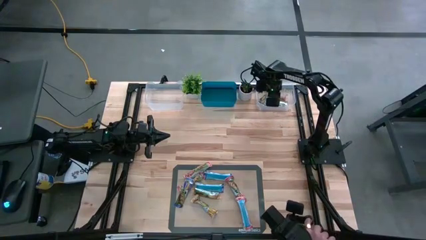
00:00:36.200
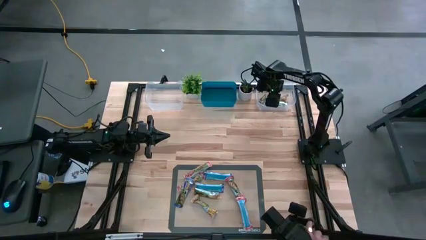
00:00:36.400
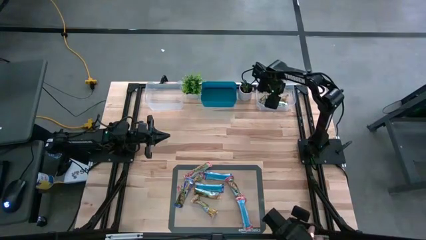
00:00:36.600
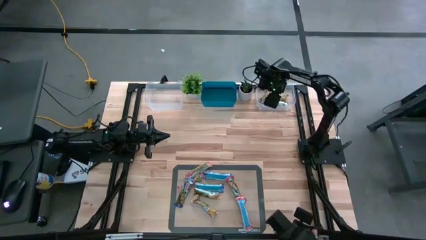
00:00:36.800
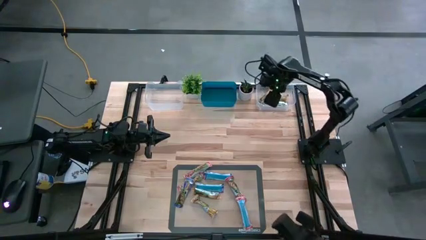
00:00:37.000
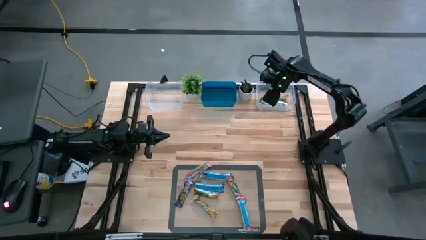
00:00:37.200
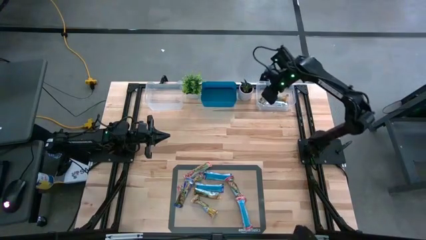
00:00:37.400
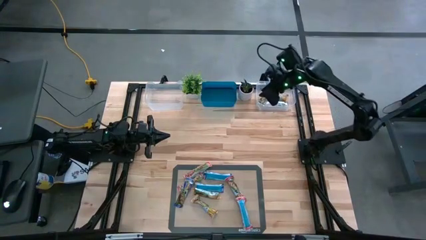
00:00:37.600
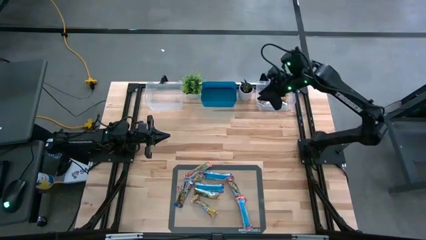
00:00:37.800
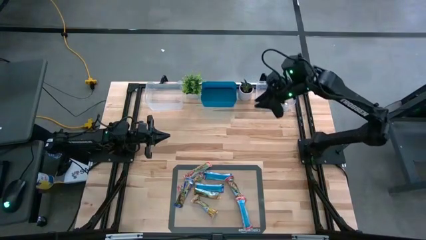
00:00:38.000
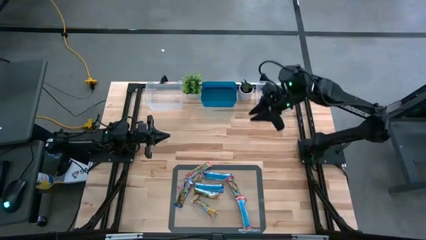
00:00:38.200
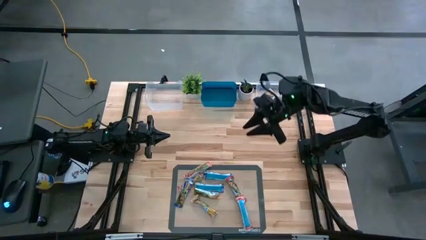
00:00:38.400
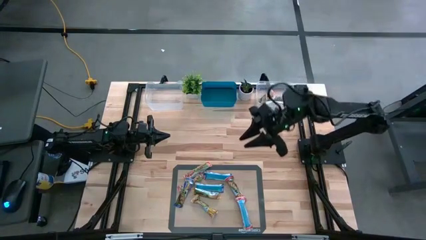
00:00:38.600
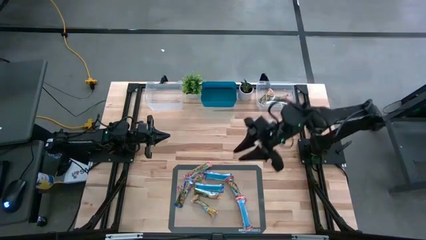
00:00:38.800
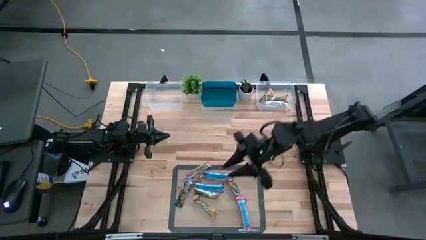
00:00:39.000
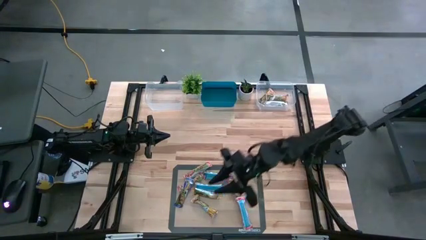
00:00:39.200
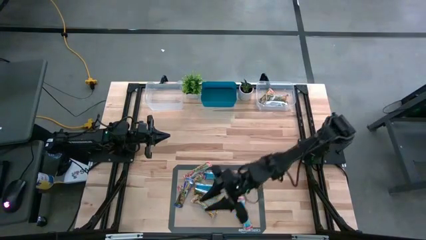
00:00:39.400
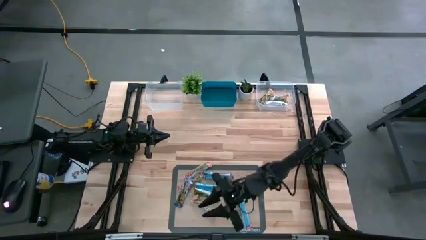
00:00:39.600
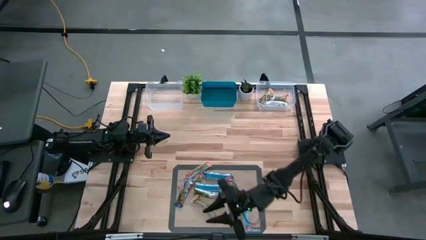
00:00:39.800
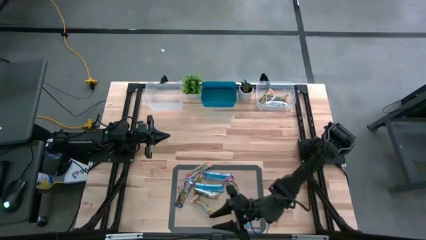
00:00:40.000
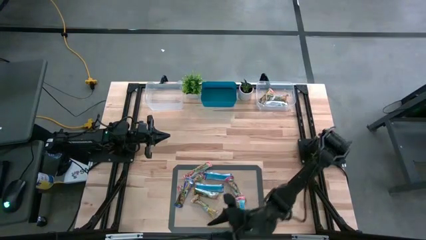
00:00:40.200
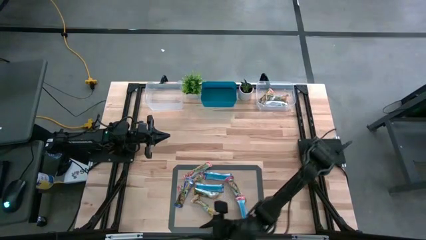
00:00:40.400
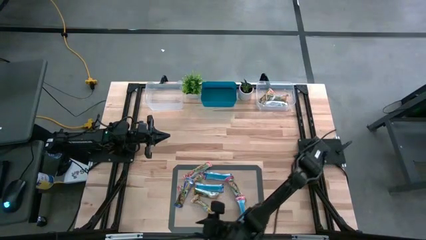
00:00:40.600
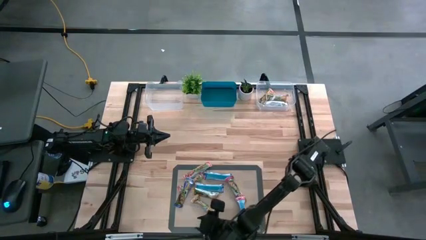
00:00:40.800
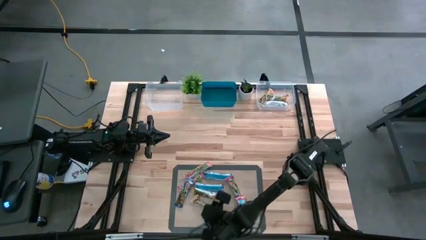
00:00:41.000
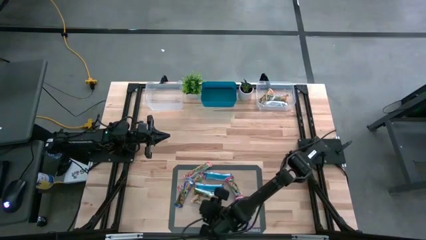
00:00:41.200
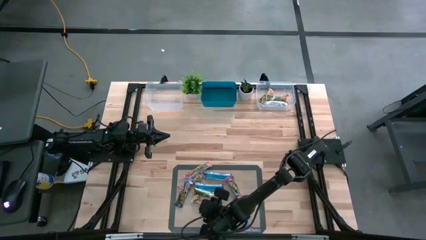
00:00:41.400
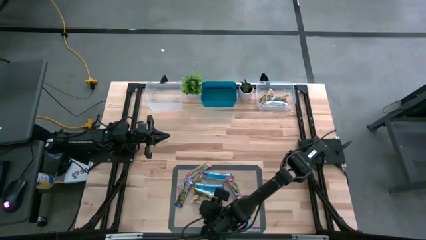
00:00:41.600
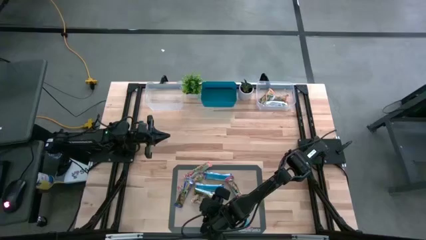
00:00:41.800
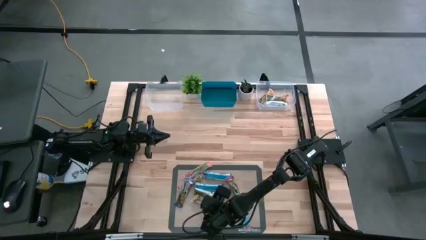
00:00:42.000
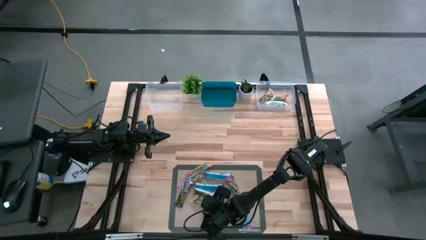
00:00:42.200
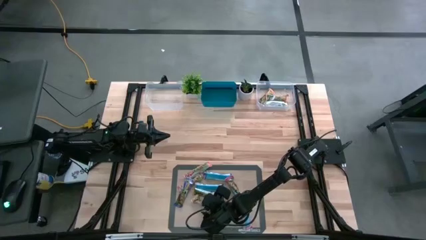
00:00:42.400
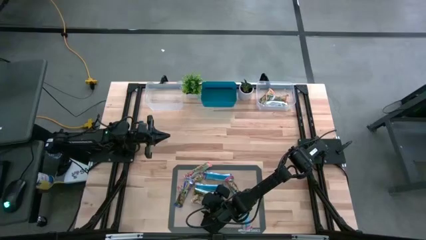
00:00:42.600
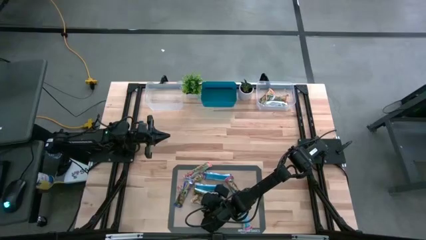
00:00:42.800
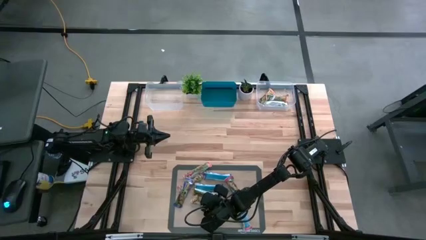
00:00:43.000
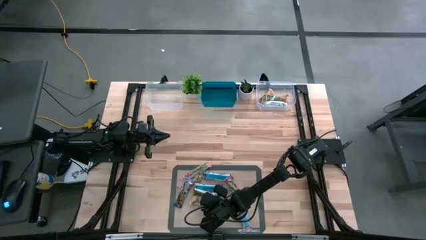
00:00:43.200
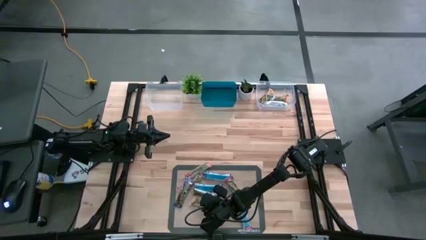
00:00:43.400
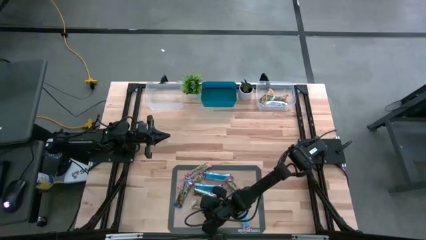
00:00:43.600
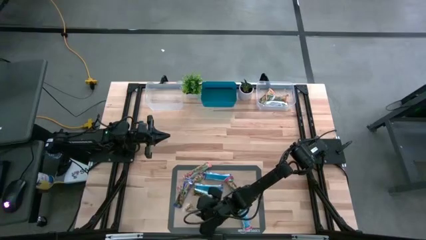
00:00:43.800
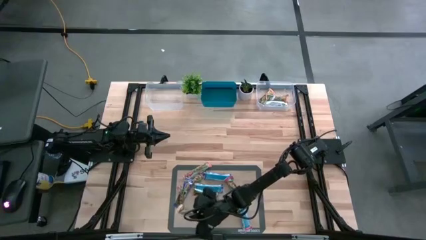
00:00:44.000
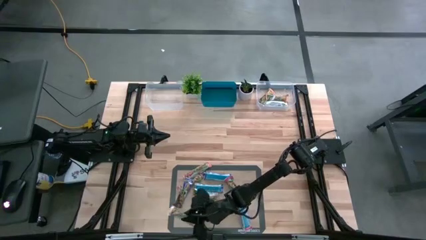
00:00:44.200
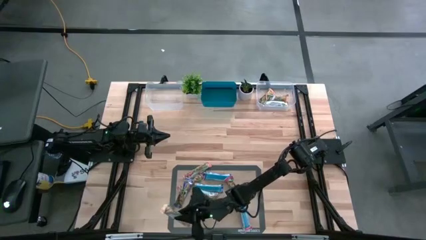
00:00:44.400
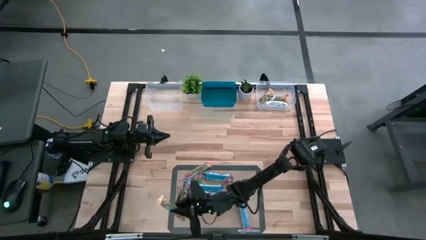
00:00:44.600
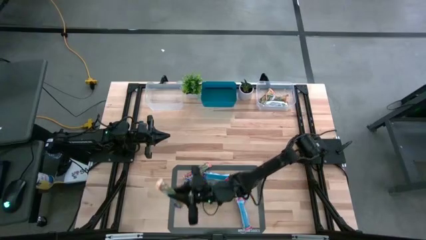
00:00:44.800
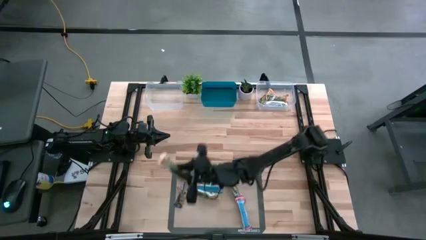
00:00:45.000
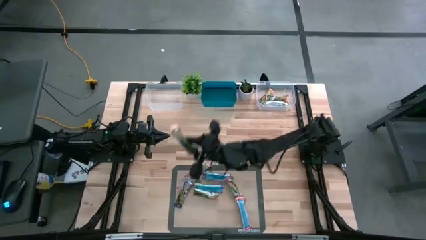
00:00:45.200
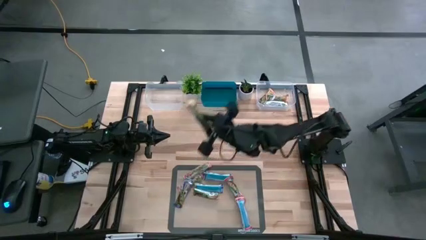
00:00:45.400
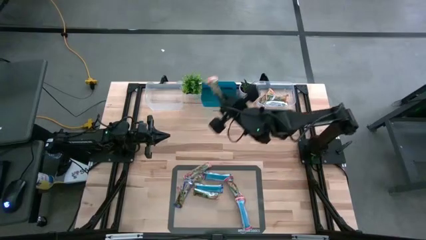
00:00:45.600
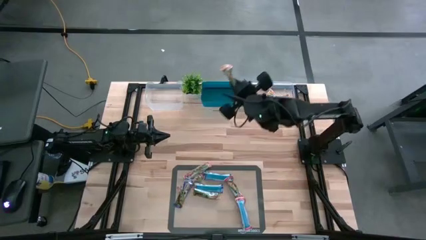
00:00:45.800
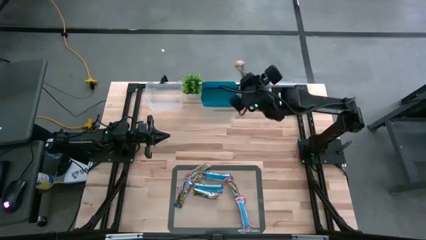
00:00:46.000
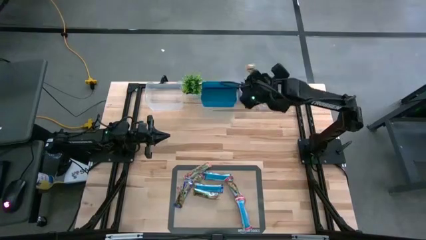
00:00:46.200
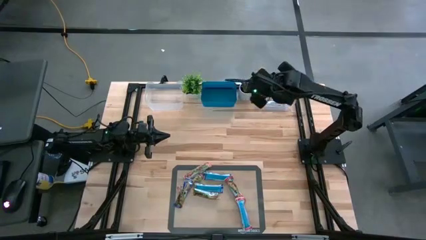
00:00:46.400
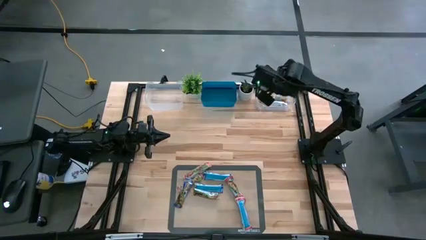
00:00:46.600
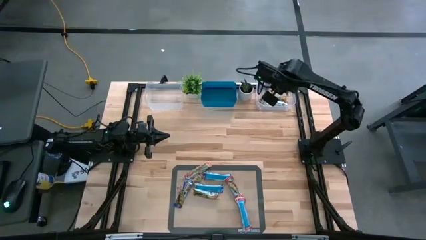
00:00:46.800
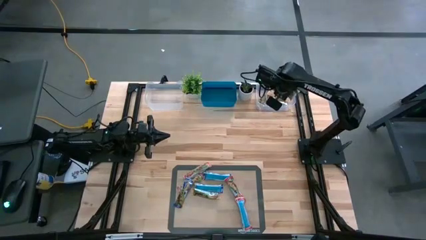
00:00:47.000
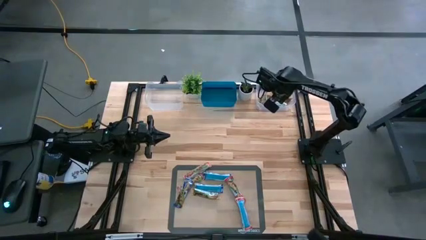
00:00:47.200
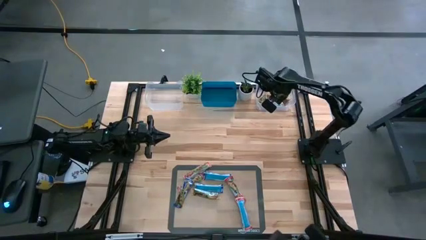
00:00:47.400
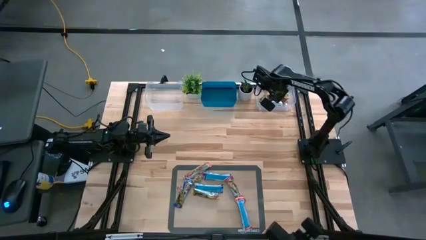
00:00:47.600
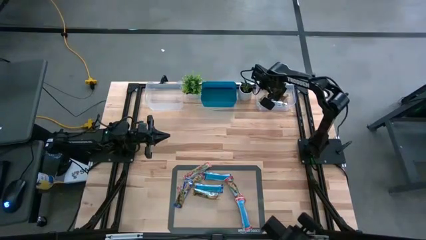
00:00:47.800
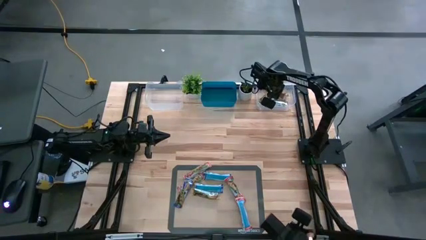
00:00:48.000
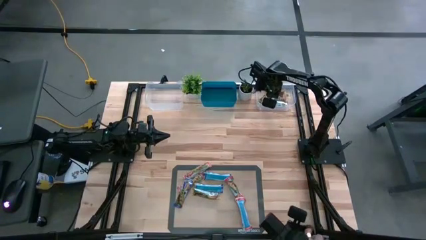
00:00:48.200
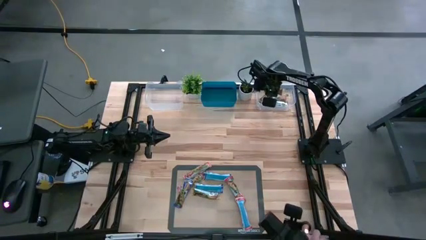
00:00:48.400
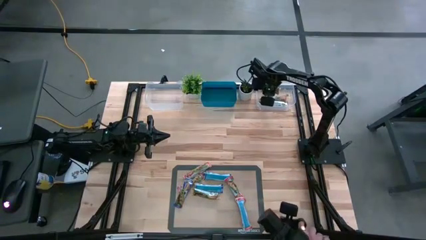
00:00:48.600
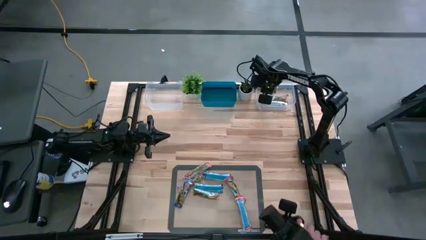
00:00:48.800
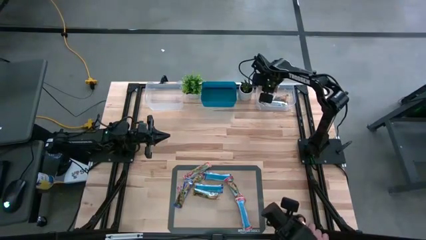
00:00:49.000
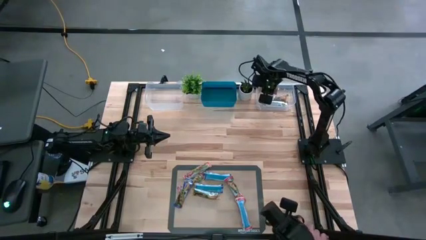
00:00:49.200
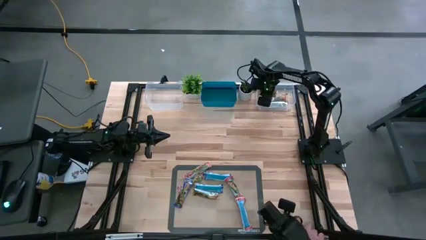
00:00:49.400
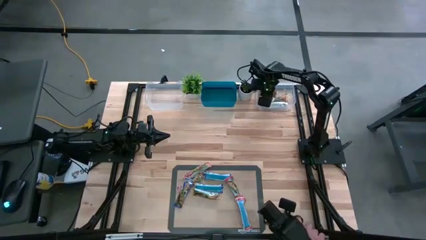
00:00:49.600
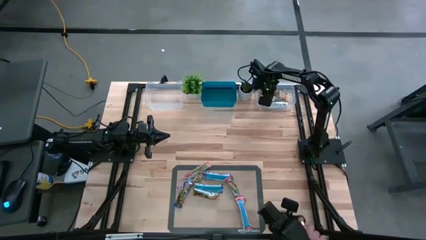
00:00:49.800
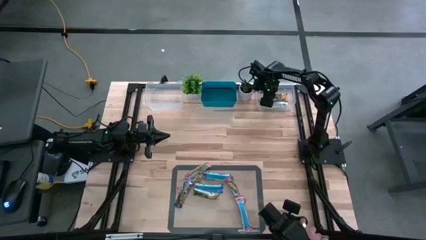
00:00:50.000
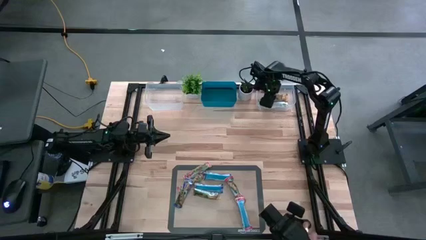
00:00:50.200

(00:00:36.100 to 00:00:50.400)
Task: Pick and place Granola Bars by type
Put the yellow granola bar into the right transparent bin

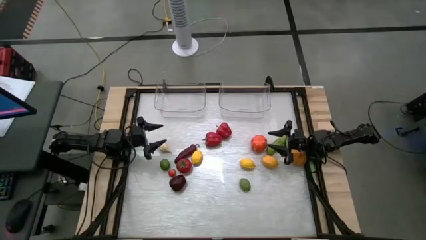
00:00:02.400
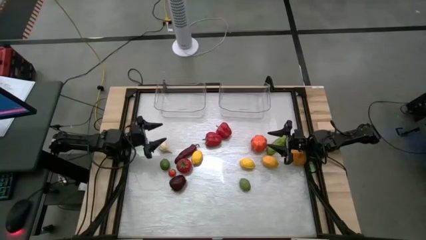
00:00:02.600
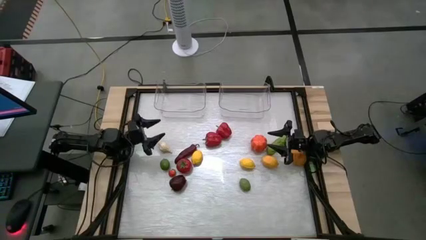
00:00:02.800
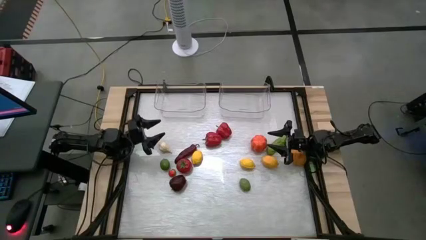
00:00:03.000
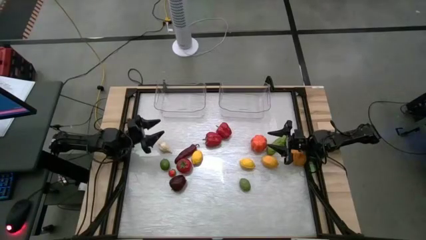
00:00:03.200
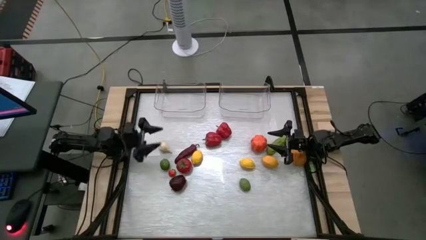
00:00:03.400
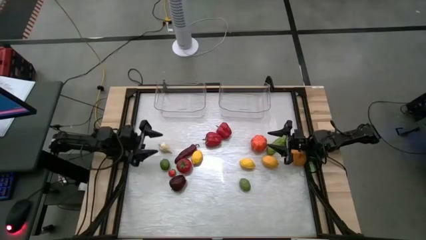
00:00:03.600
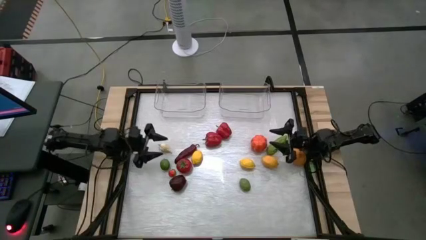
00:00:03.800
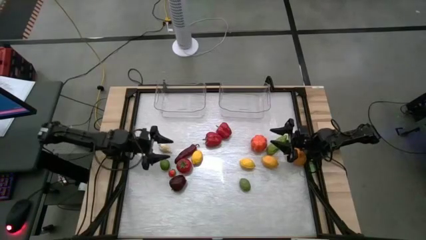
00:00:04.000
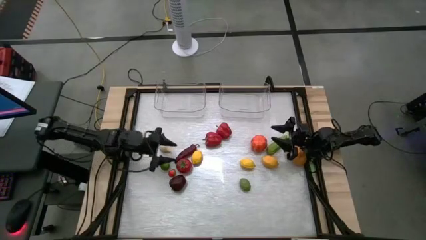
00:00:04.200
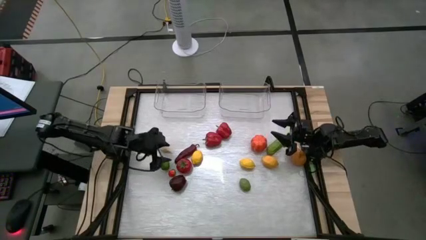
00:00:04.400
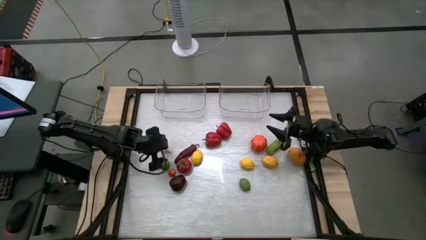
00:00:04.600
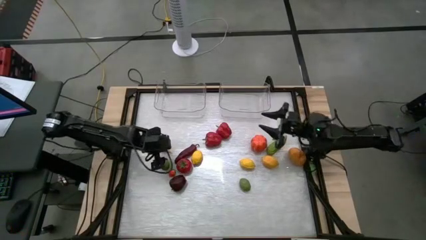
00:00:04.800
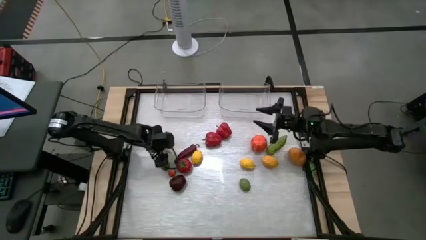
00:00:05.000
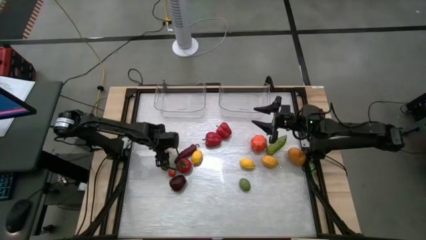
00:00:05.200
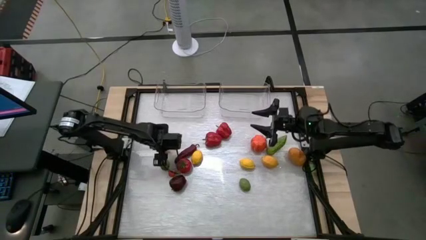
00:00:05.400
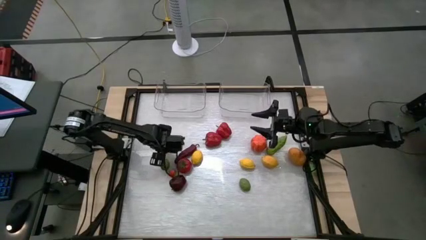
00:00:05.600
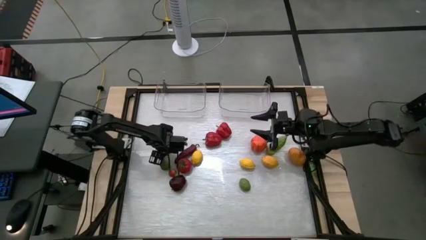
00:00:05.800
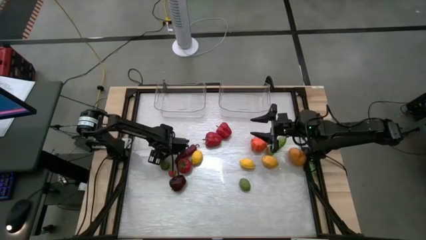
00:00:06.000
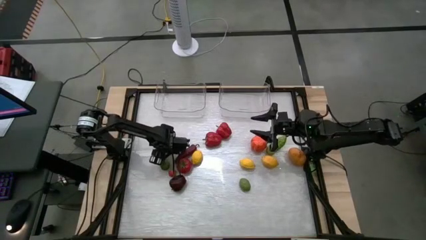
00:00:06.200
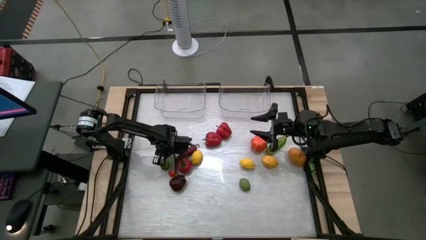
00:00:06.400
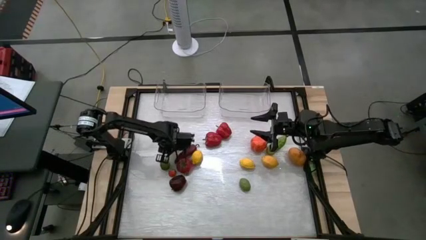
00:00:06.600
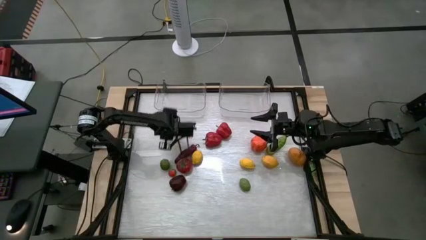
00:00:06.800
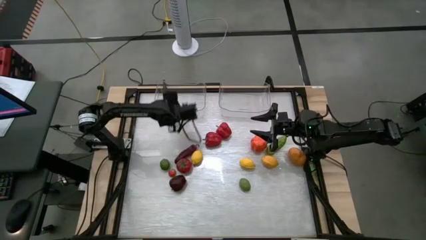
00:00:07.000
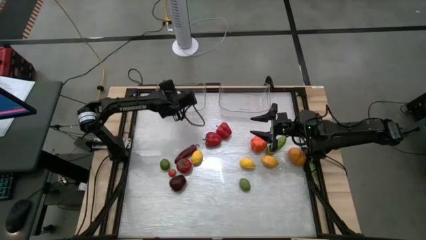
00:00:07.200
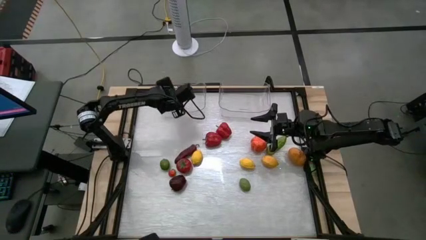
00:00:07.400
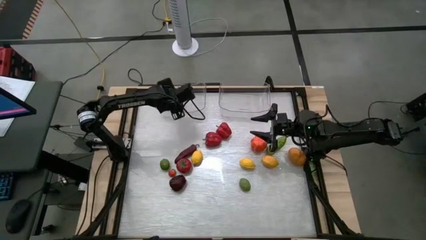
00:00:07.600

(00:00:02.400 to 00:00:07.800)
Task: Sort produce into baskets
Put the garlic in the container
